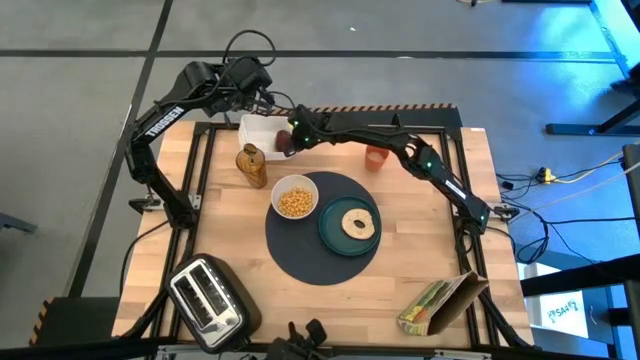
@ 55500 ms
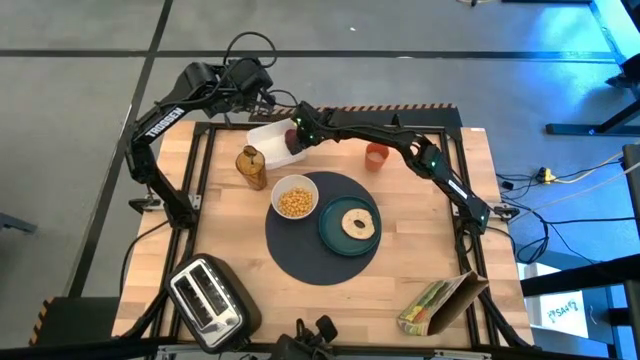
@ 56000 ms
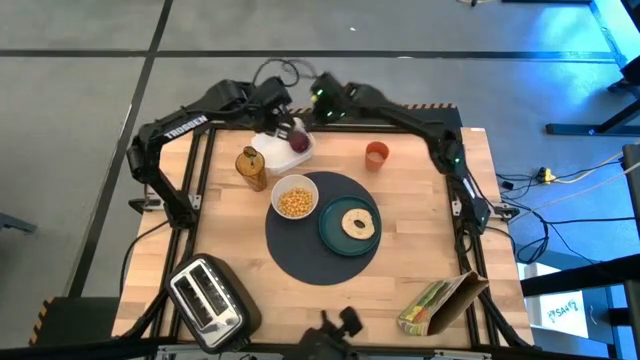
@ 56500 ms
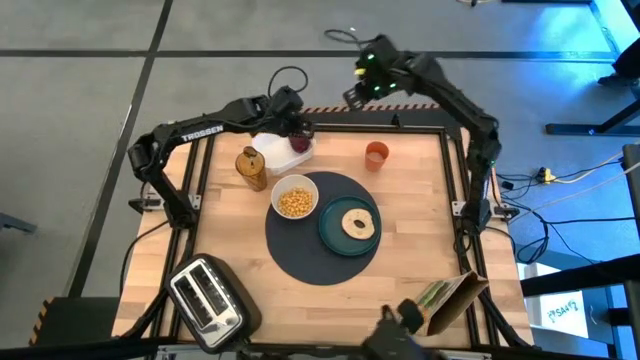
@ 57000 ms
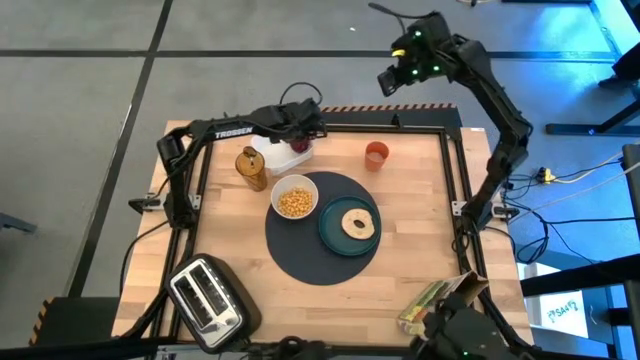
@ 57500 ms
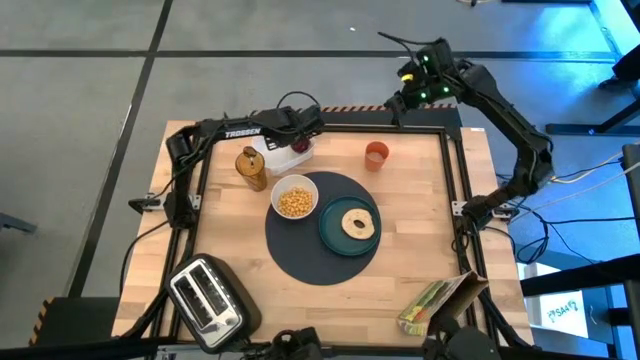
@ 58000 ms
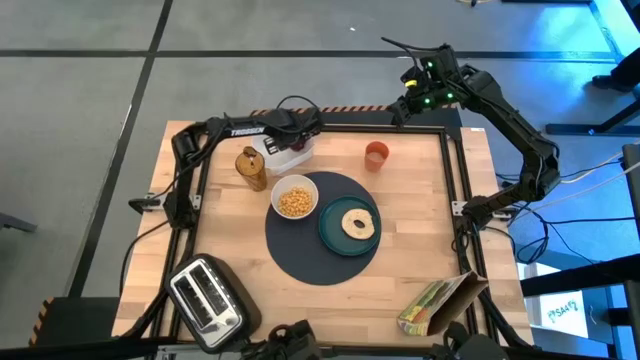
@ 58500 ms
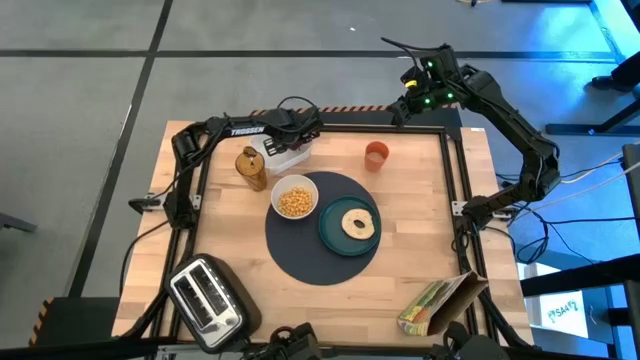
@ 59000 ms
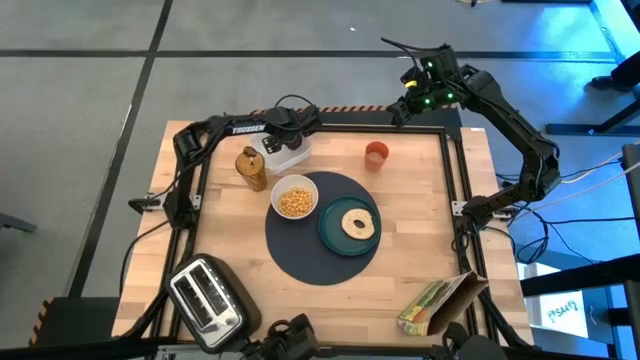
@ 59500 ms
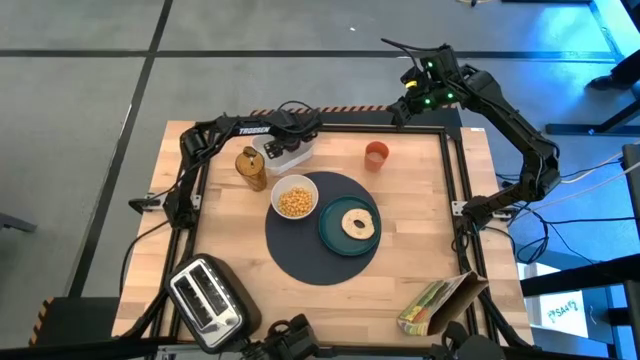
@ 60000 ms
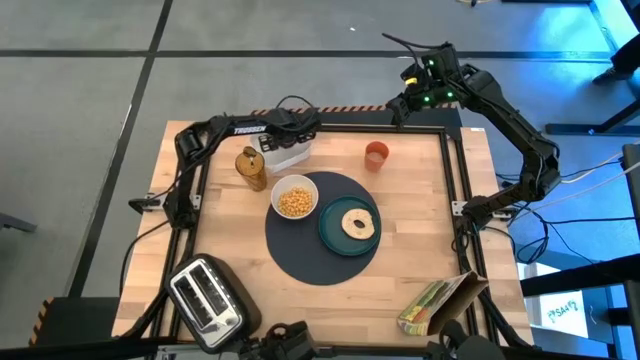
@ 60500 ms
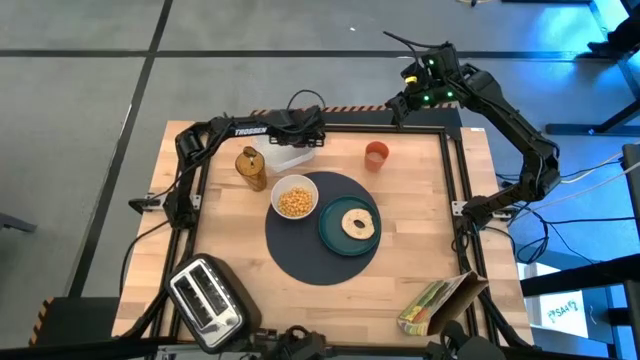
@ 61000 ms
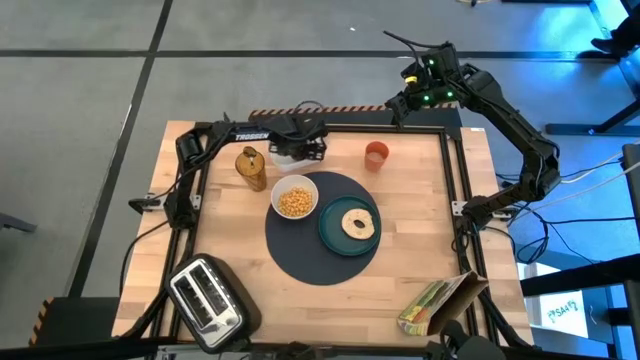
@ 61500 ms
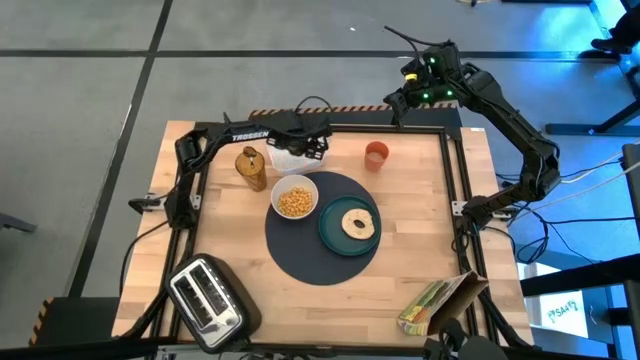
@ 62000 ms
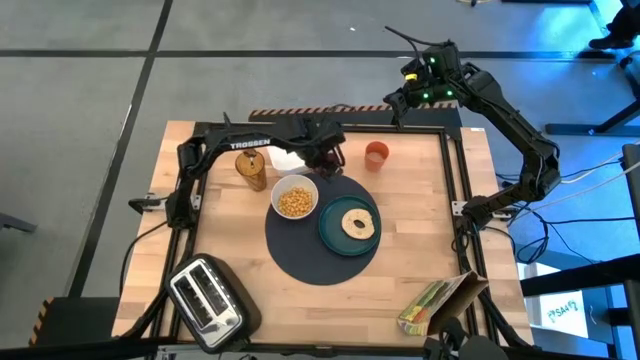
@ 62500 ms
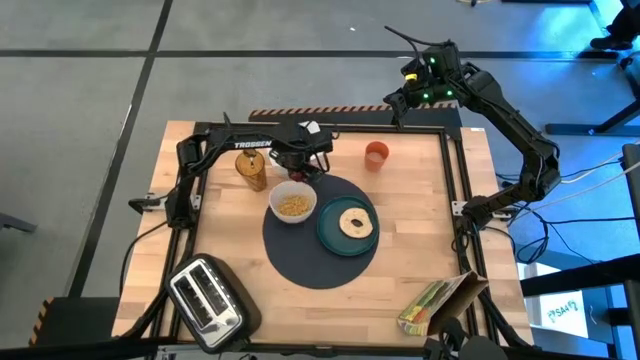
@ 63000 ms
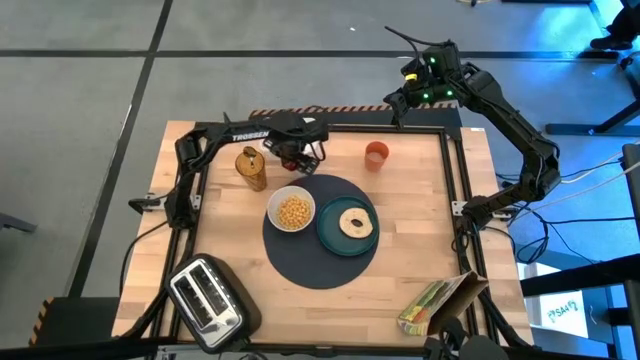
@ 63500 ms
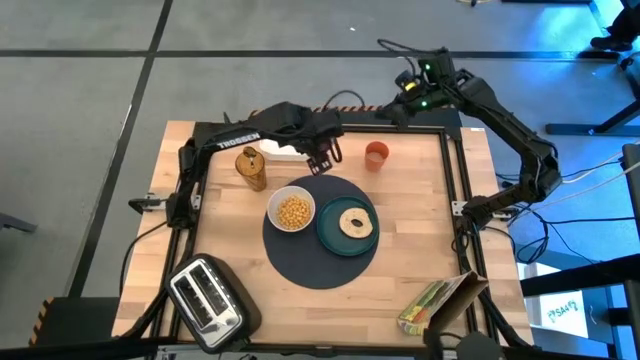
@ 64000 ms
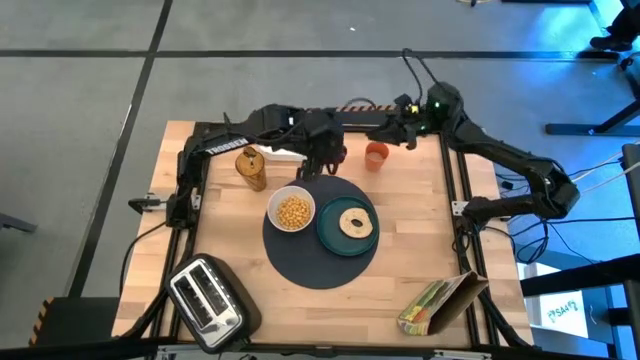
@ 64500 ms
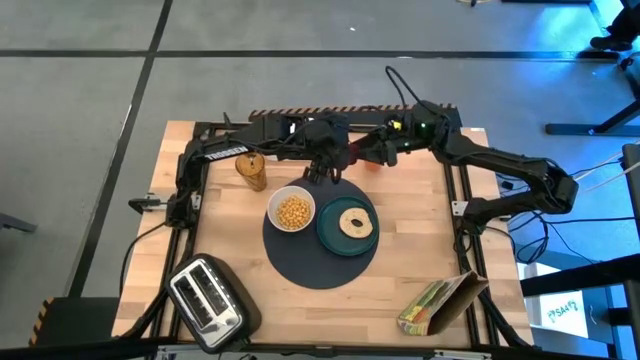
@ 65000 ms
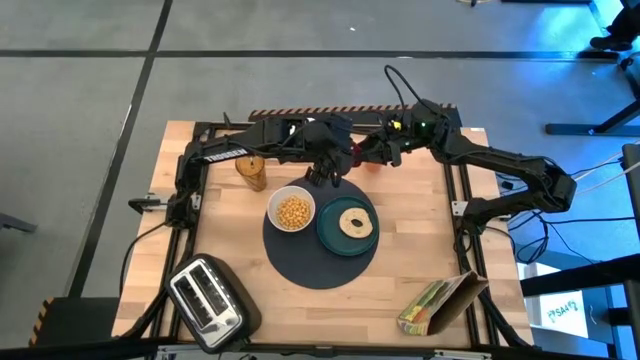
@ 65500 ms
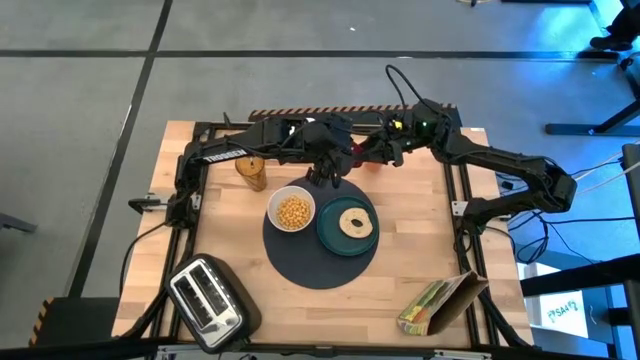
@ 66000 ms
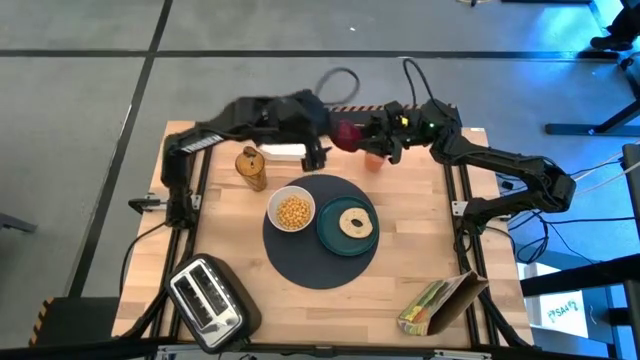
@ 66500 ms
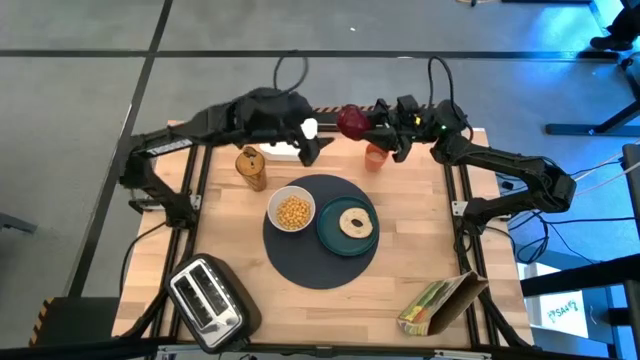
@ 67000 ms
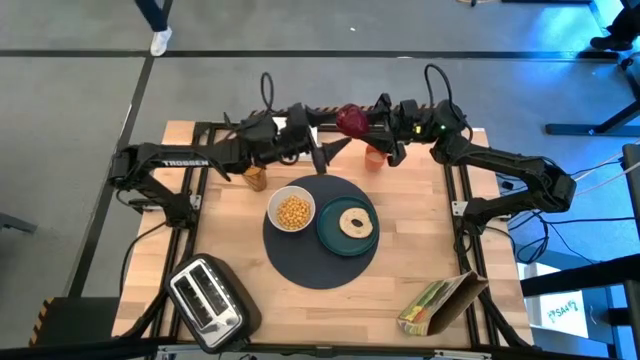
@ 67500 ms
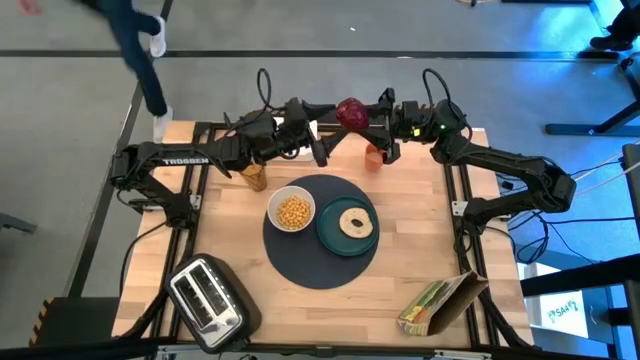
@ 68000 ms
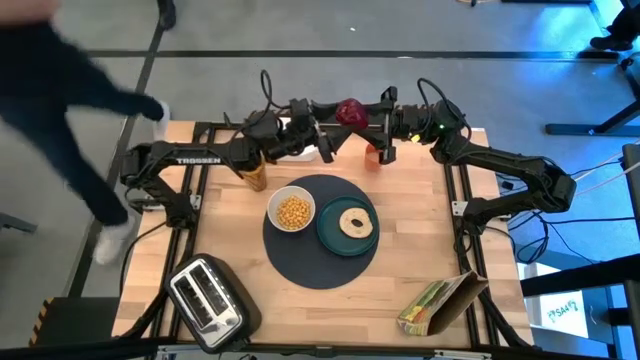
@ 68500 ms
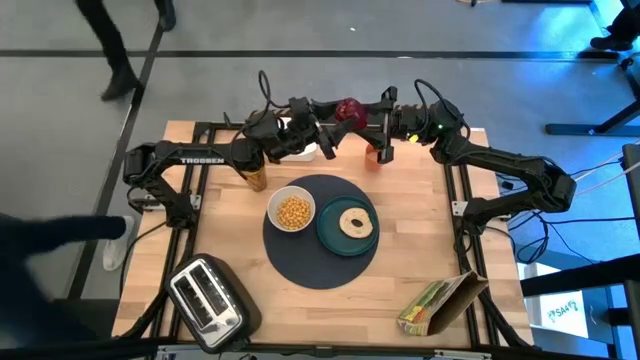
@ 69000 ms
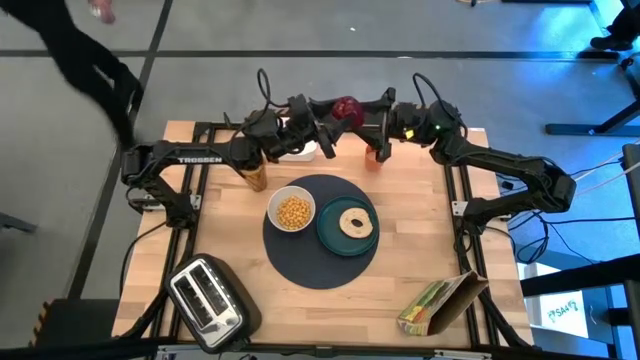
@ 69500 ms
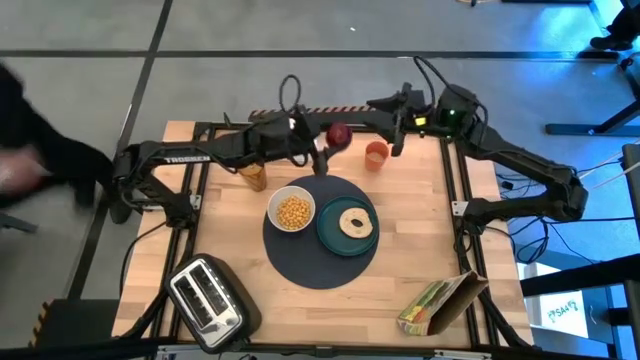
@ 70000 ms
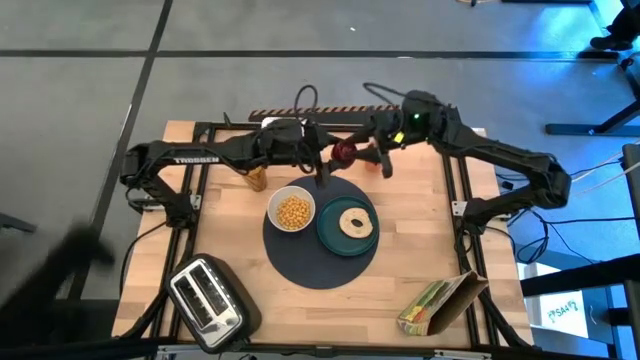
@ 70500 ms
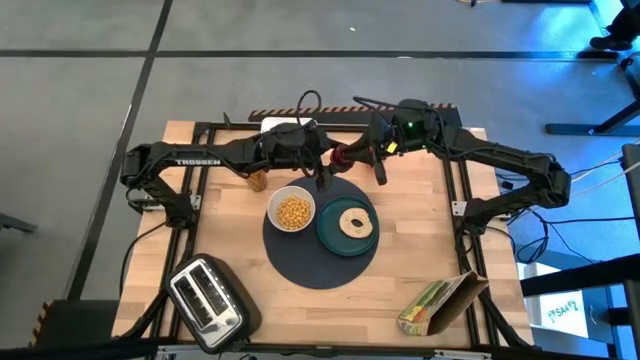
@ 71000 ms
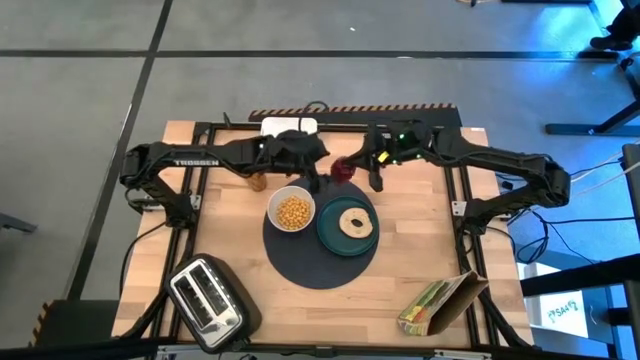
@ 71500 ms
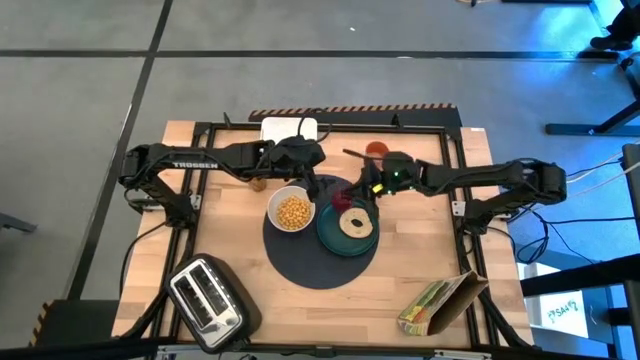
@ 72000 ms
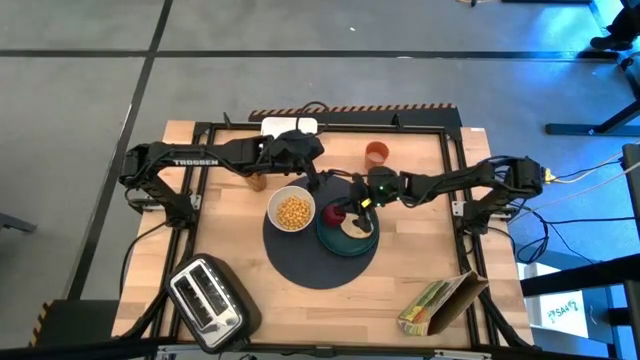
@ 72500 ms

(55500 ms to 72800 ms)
Task: Arrange a breakfast setting
Put the red apple on the green plate

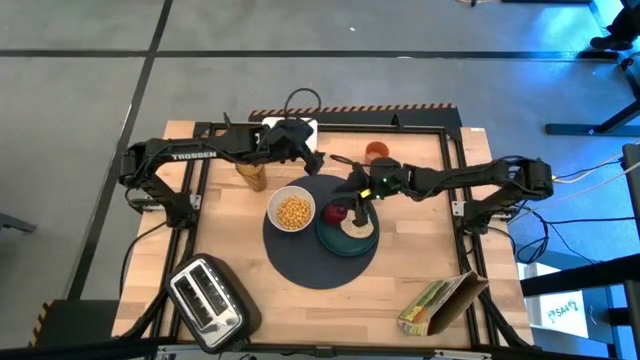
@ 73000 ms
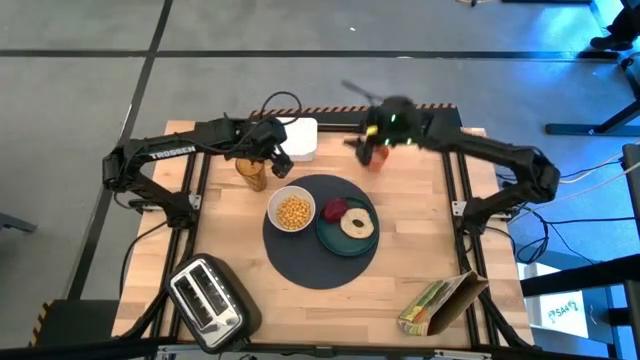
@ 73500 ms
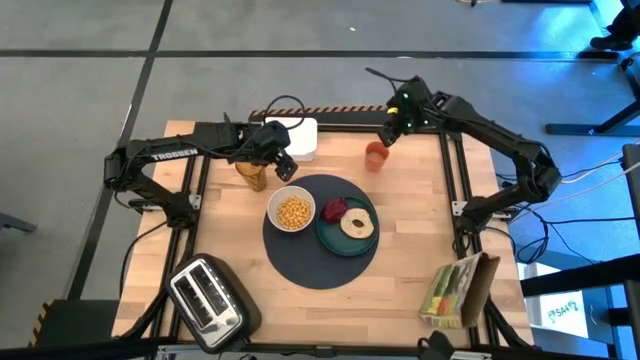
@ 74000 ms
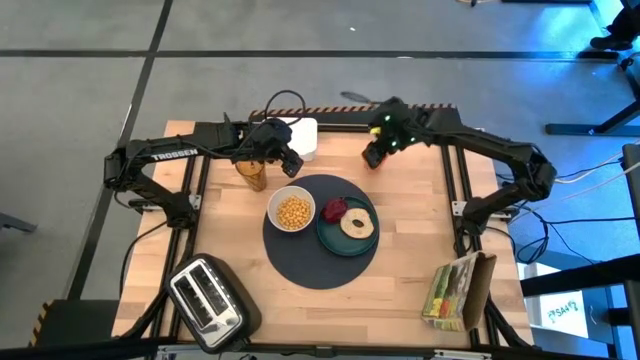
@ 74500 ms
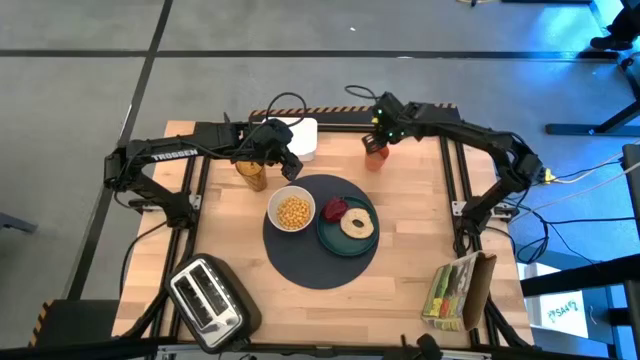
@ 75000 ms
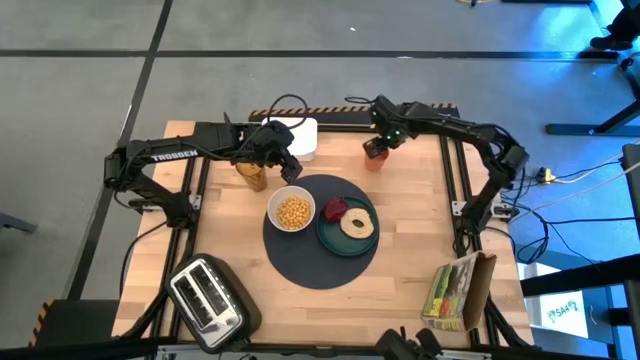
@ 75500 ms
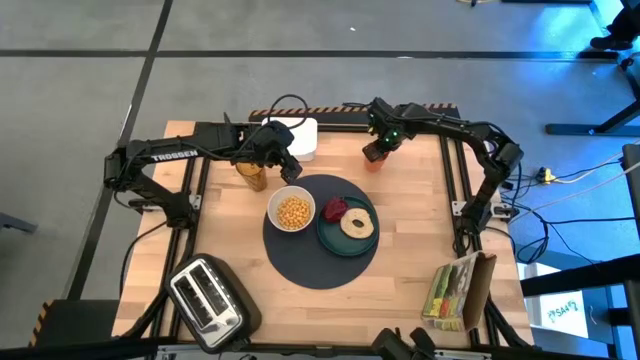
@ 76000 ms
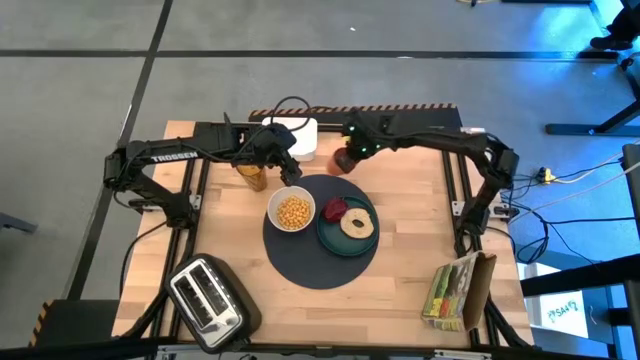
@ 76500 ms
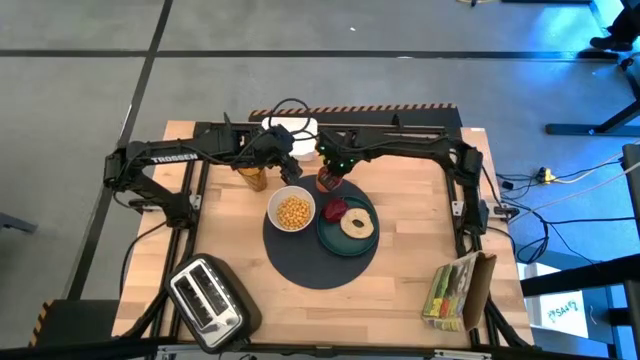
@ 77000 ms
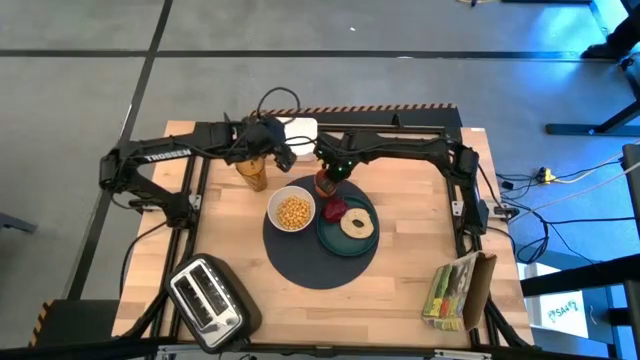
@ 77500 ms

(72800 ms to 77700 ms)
Put the orange cup of rice to the top of the green plate
